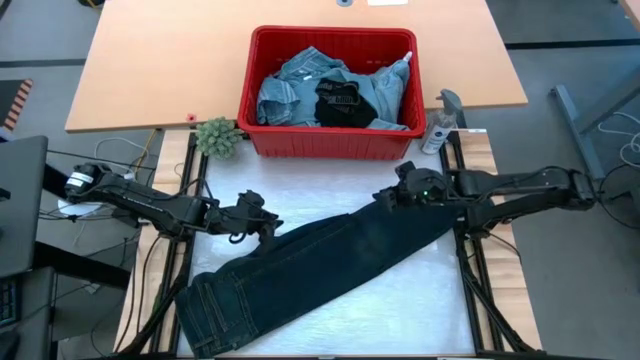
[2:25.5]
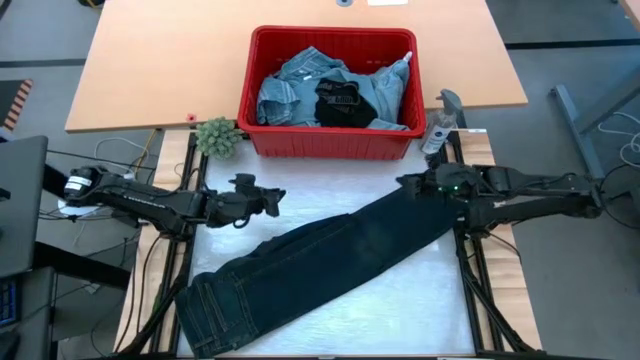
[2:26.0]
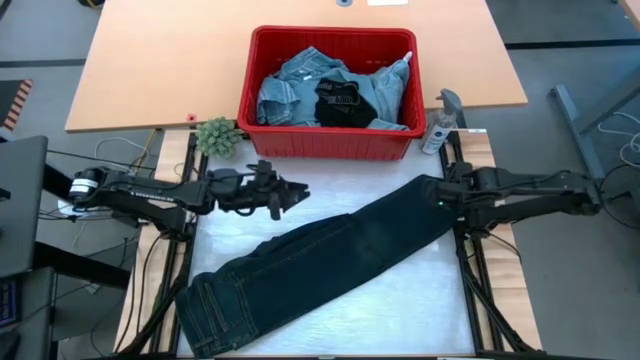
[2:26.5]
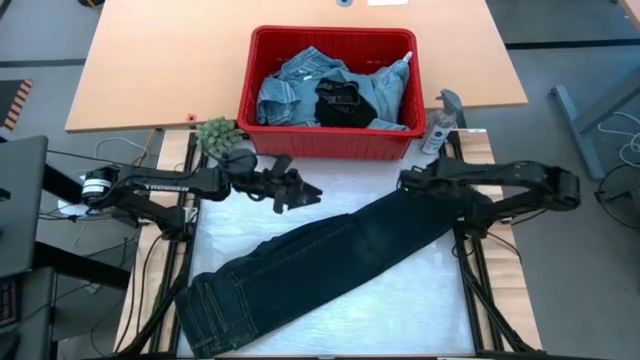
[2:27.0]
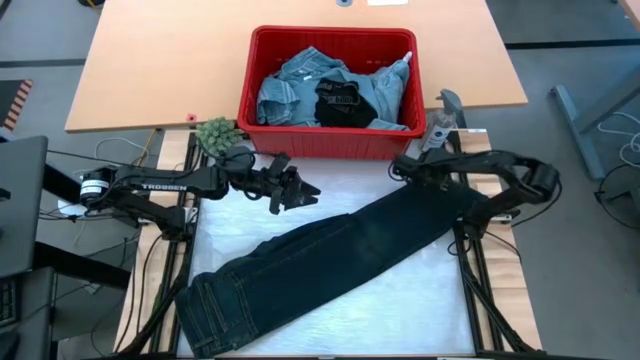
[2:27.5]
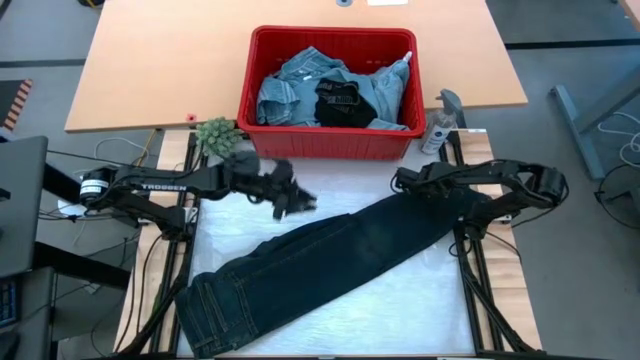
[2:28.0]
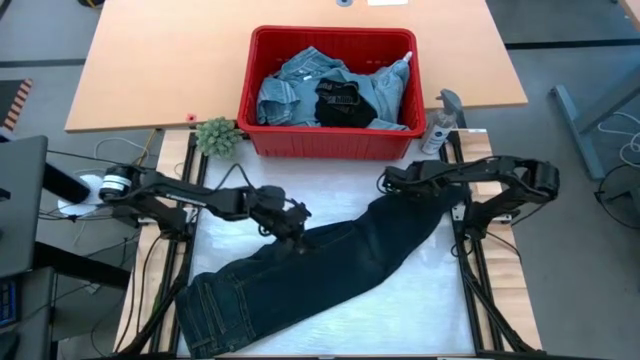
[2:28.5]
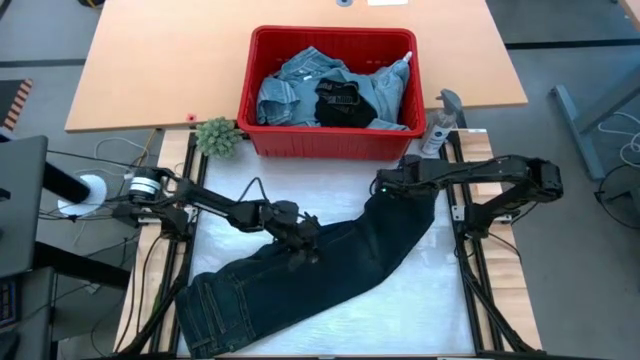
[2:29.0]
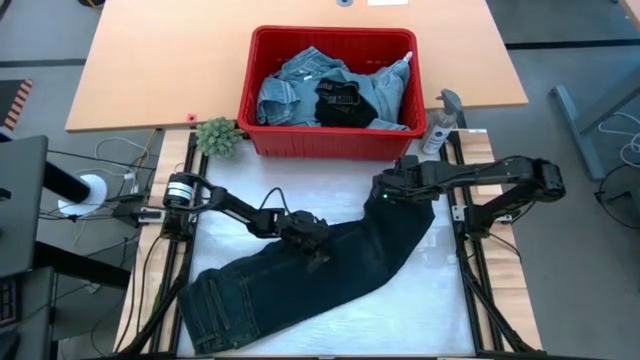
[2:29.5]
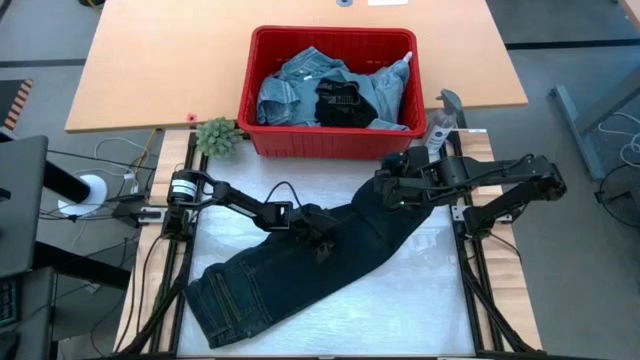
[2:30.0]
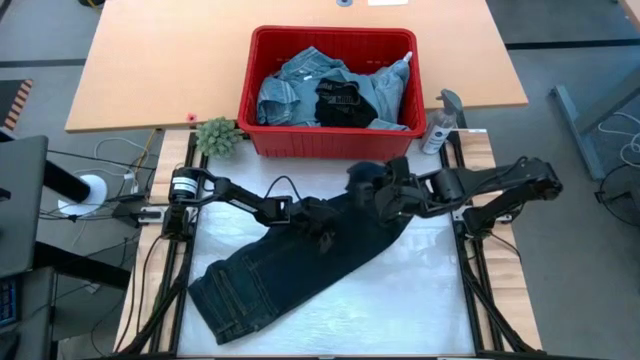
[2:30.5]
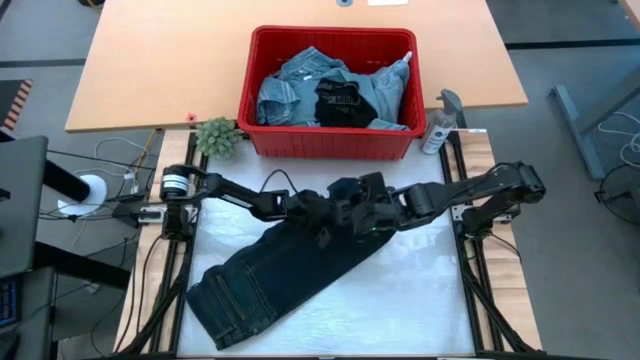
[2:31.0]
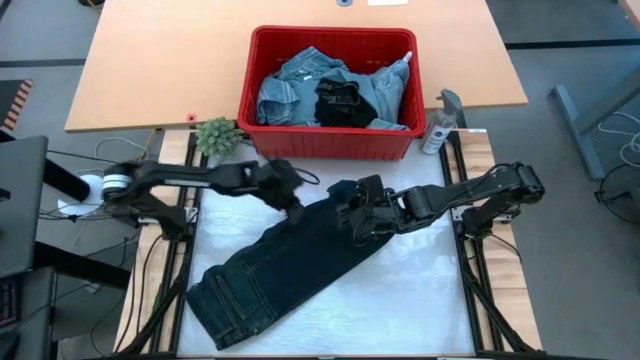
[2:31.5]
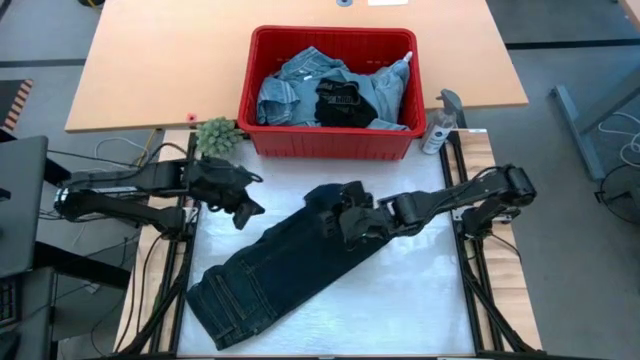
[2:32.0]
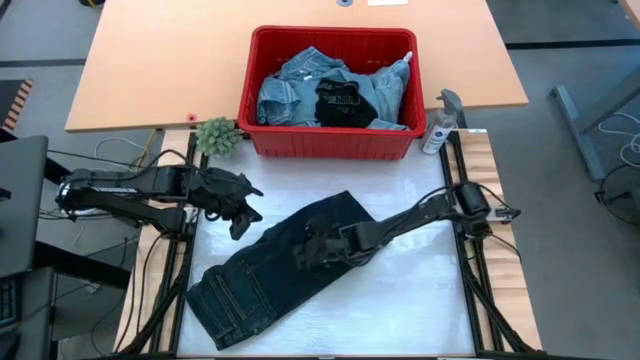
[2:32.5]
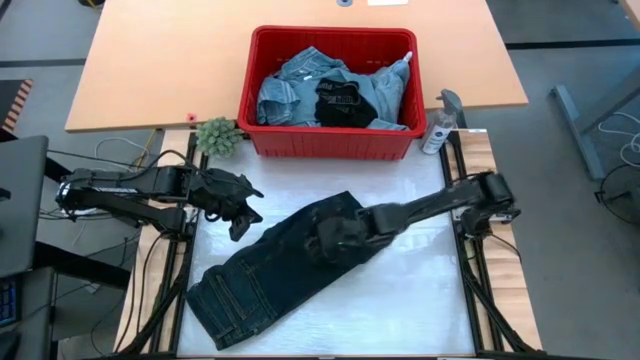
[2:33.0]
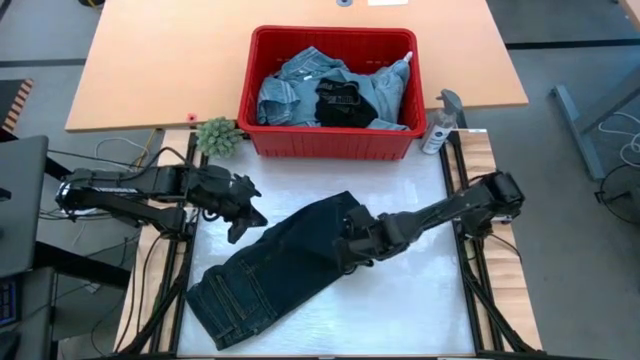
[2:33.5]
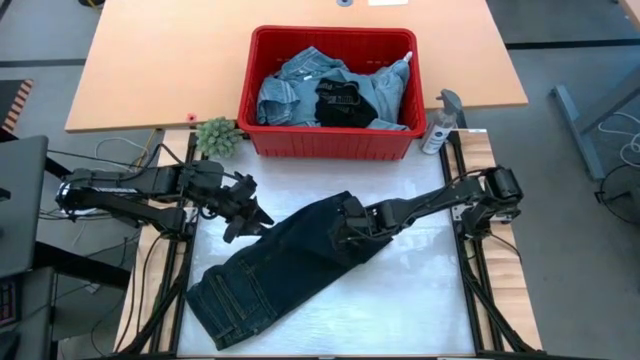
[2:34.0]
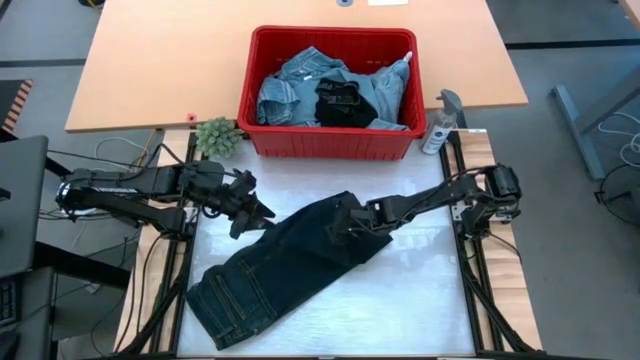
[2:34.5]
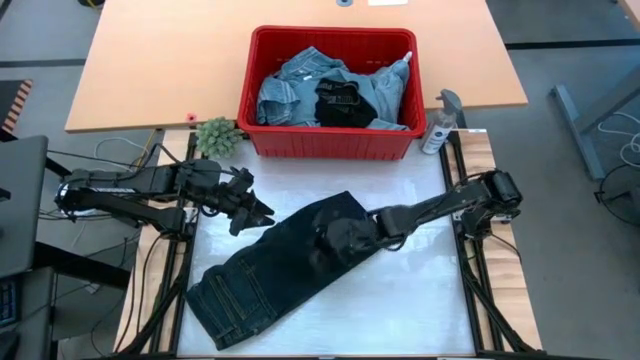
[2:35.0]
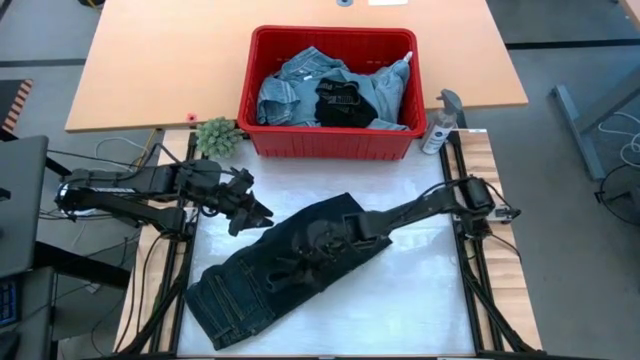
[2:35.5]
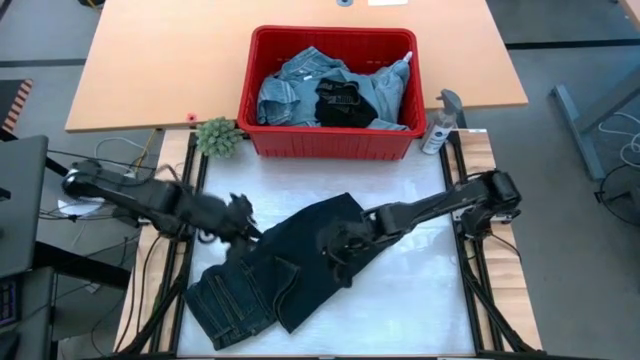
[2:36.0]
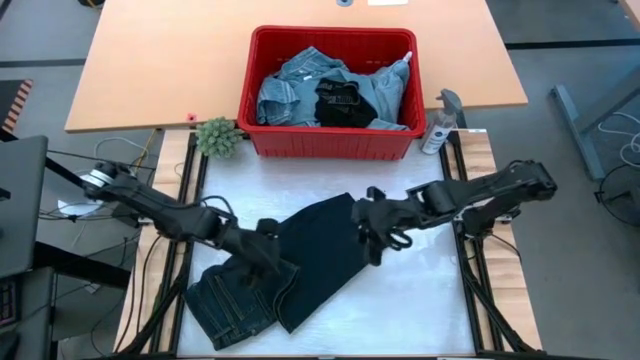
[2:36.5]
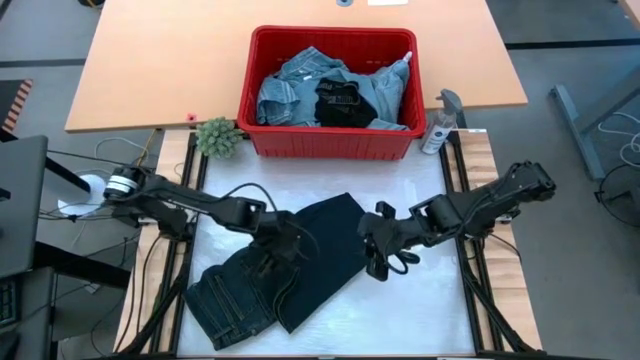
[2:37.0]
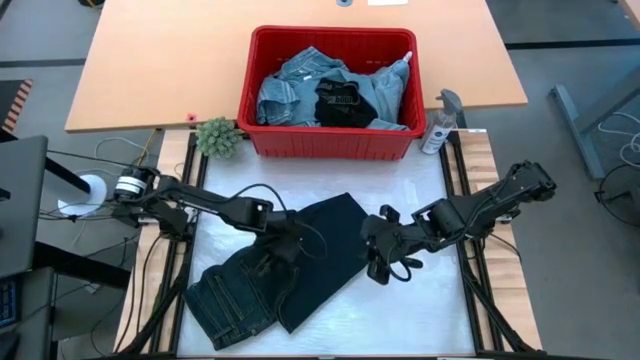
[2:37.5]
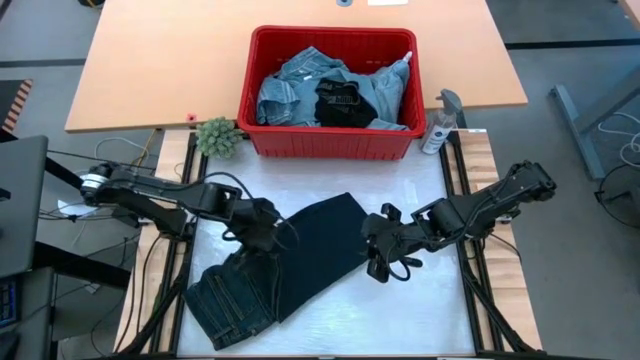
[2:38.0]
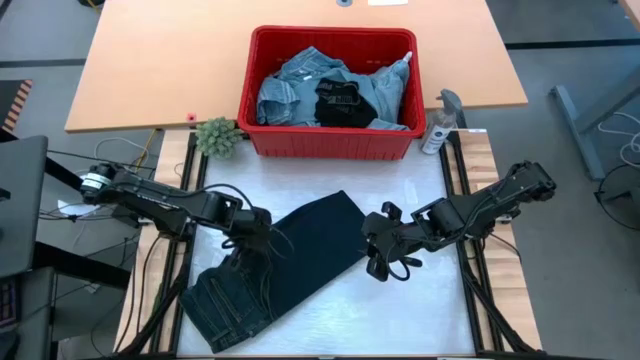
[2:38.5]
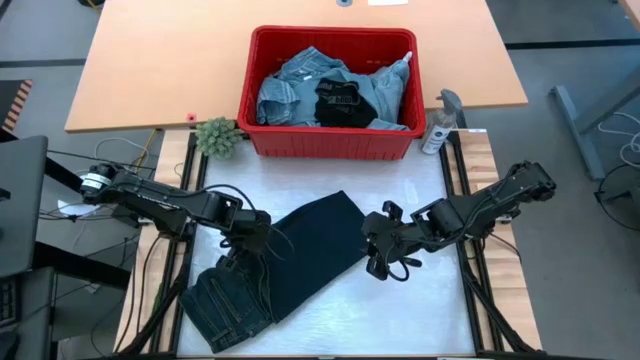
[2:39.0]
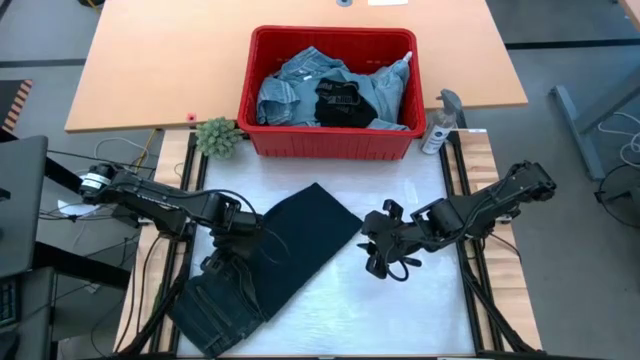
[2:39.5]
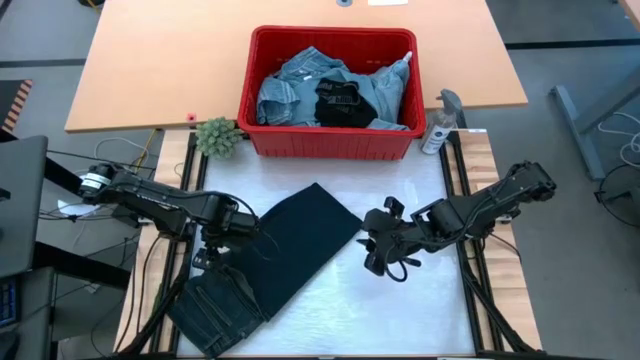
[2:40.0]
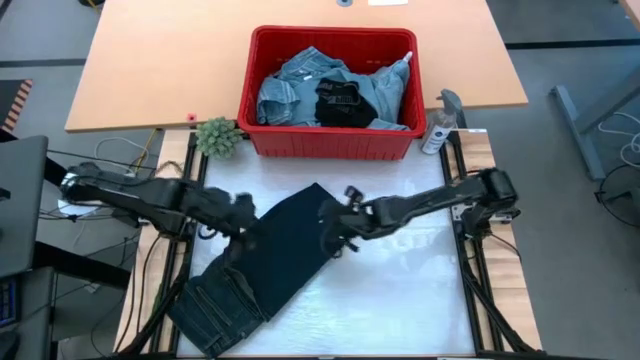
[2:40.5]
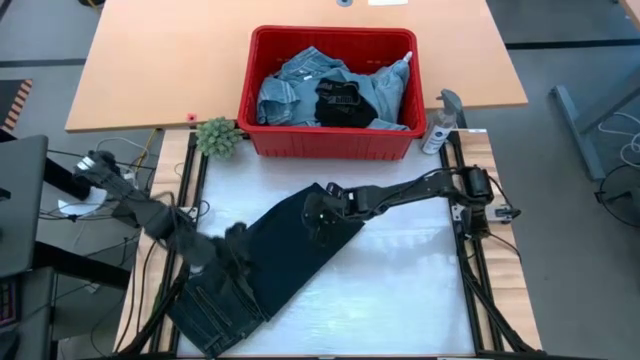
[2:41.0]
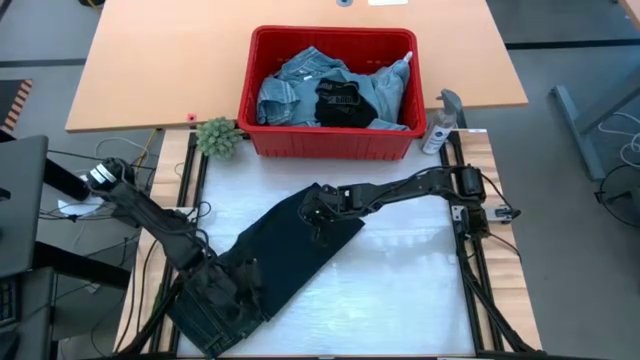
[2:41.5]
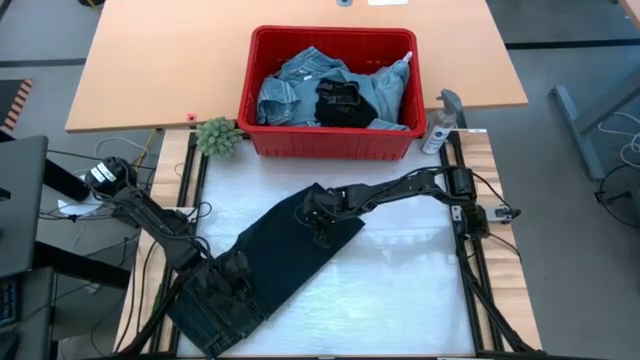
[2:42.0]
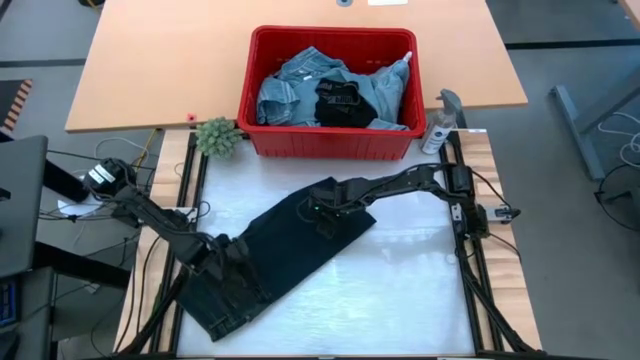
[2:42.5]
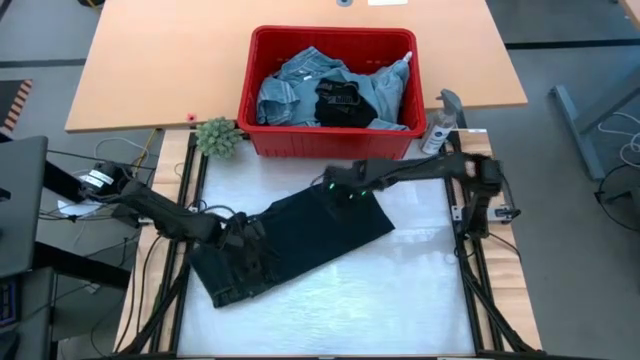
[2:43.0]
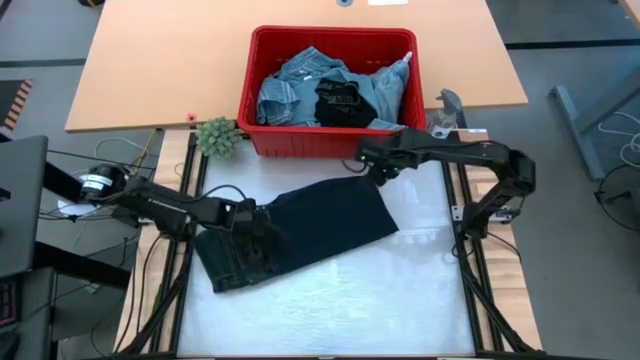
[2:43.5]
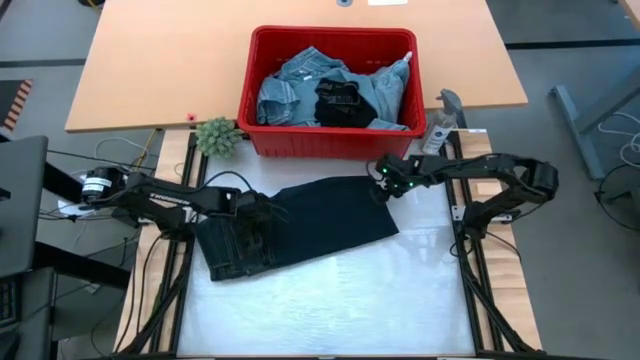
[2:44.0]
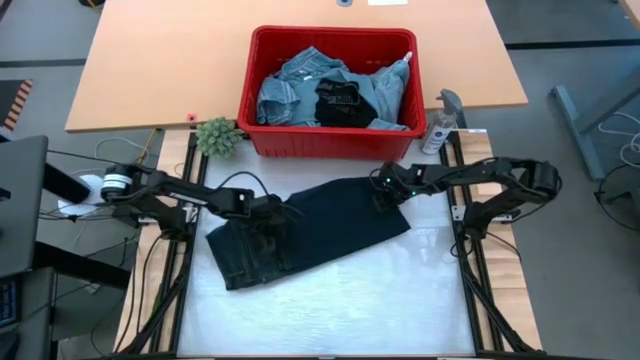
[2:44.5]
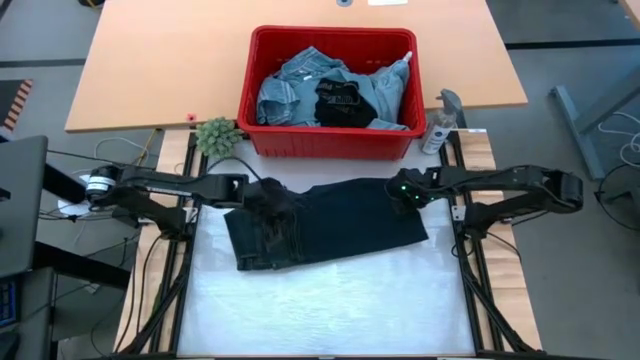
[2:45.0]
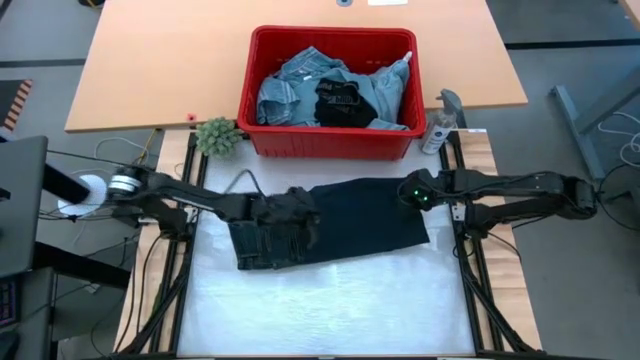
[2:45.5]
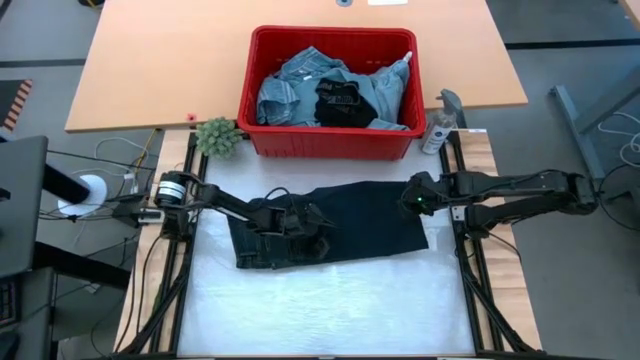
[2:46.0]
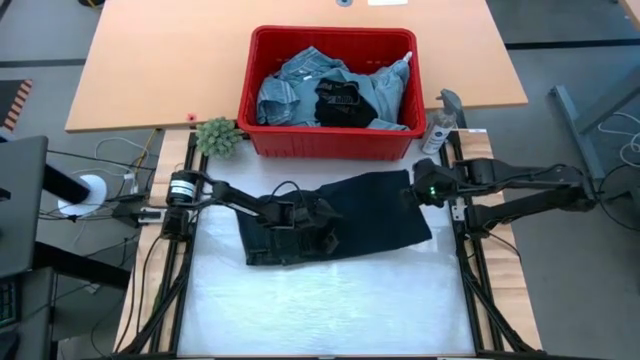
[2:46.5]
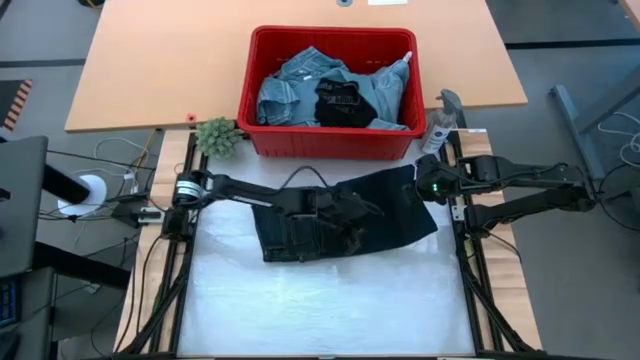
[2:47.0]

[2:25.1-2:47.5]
Task: Fold Laundry from Bin
Fold the black pants

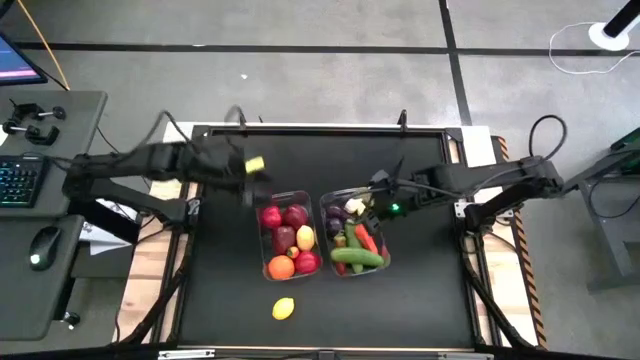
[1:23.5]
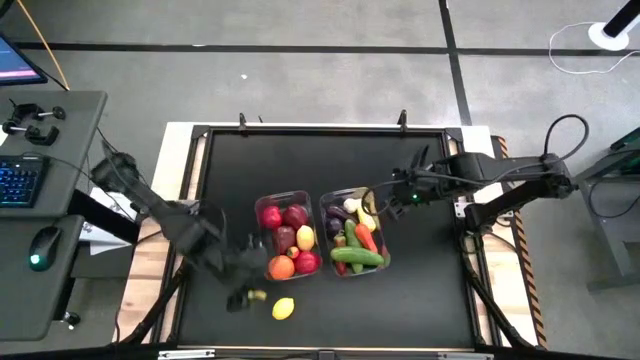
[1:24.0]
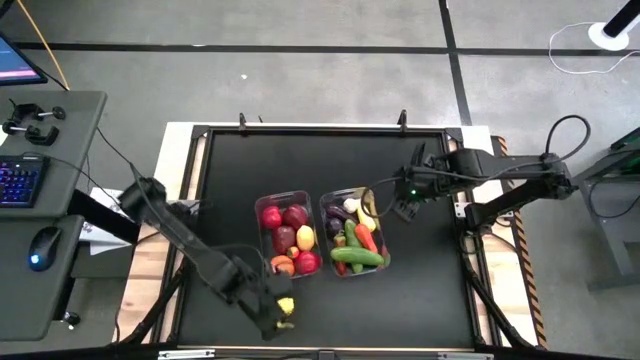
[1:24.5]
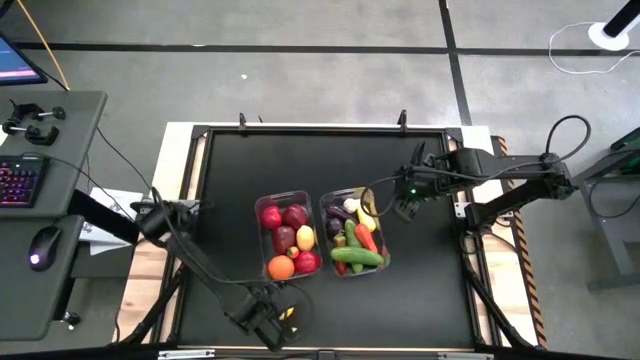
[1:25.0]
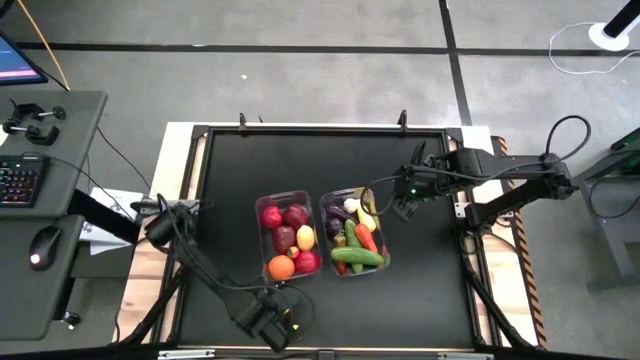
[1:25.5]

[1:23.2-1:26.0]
Task: Sort produce into baskets
Put the lemon into the left transparent bin
